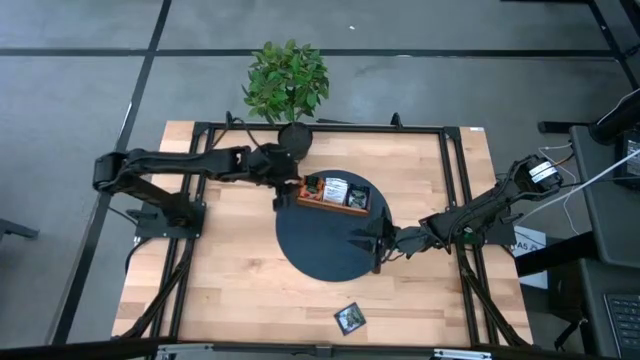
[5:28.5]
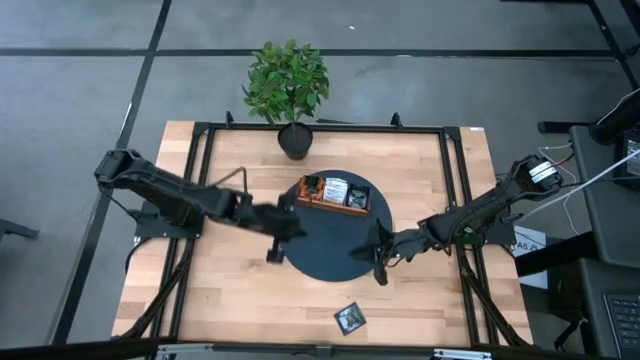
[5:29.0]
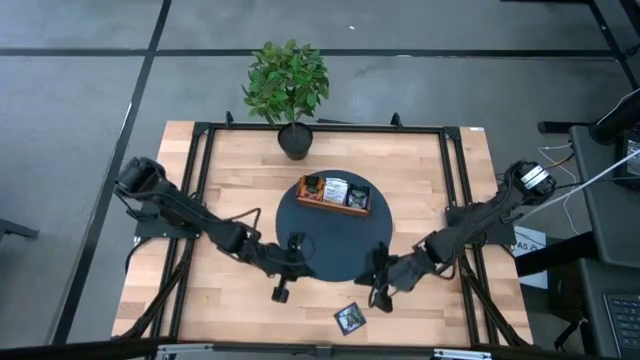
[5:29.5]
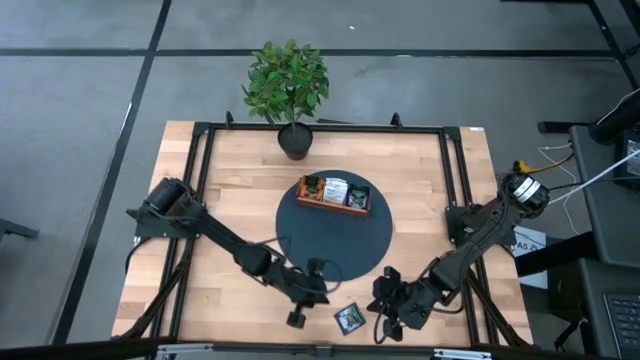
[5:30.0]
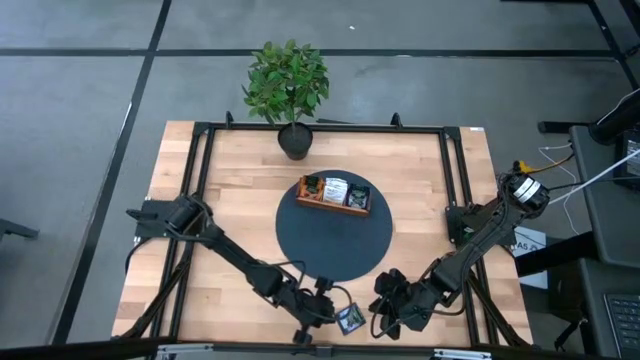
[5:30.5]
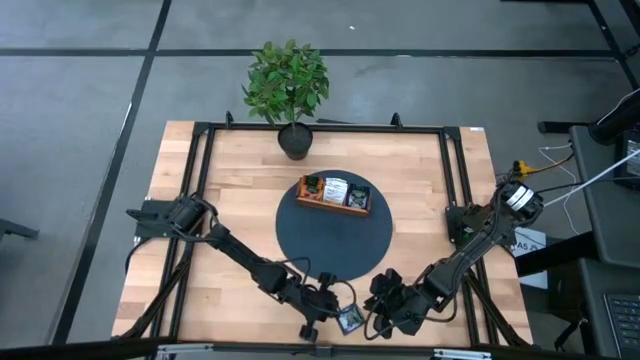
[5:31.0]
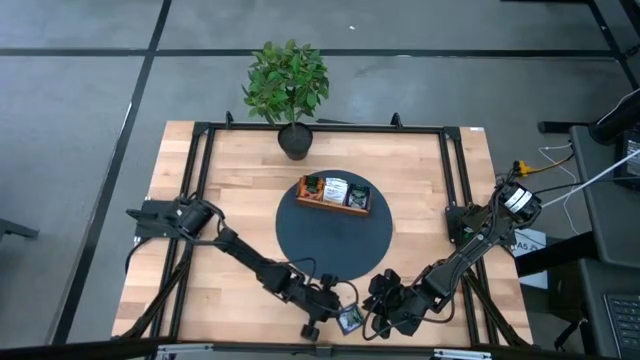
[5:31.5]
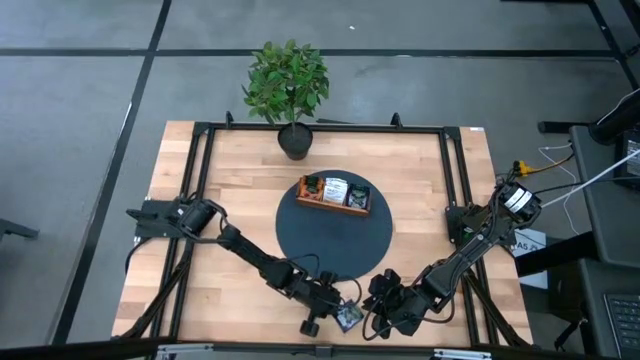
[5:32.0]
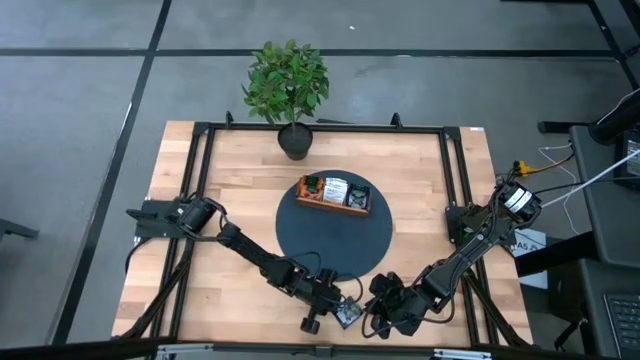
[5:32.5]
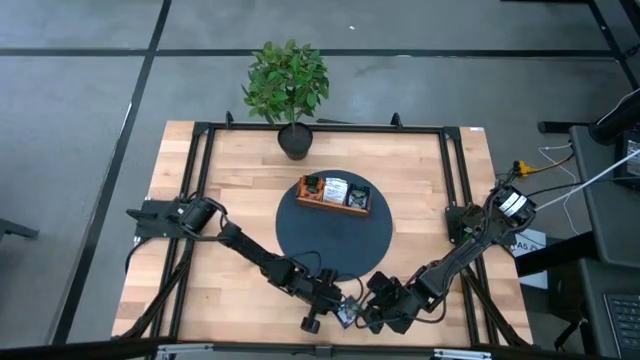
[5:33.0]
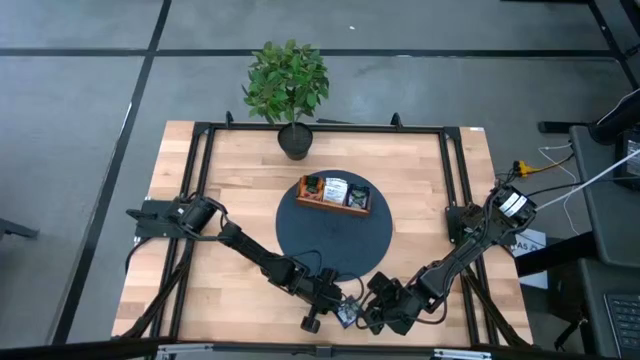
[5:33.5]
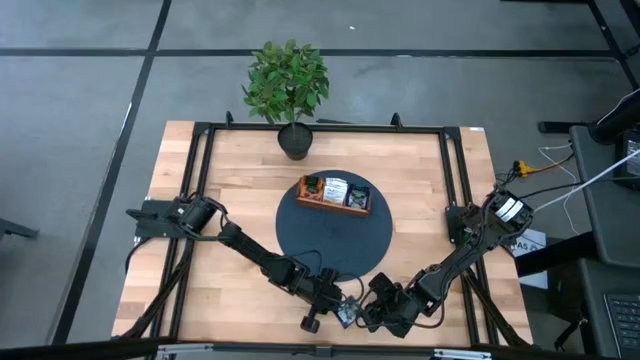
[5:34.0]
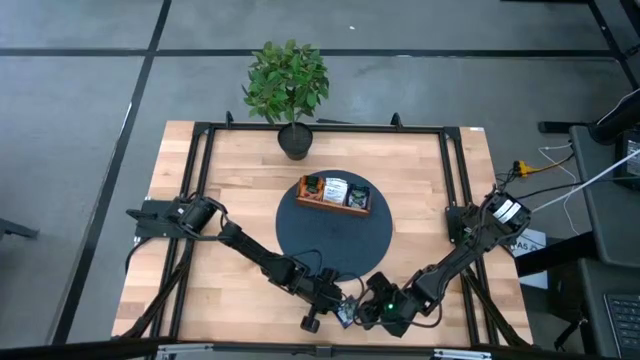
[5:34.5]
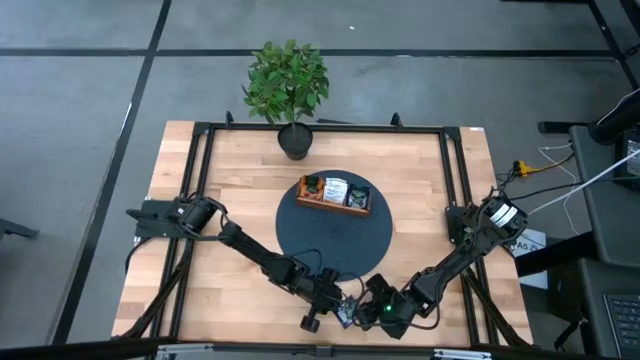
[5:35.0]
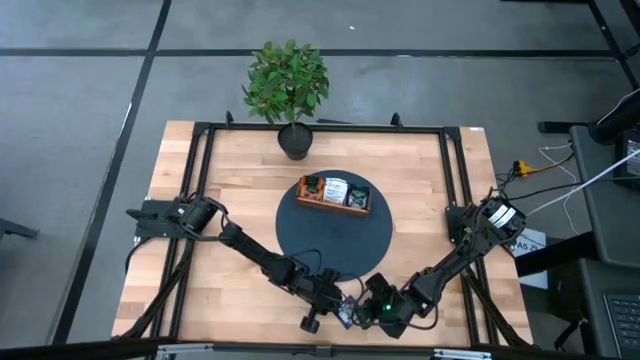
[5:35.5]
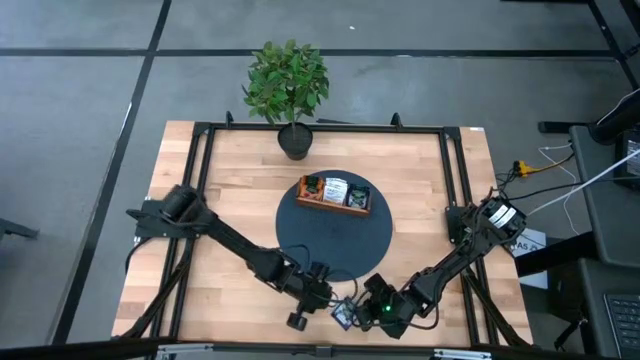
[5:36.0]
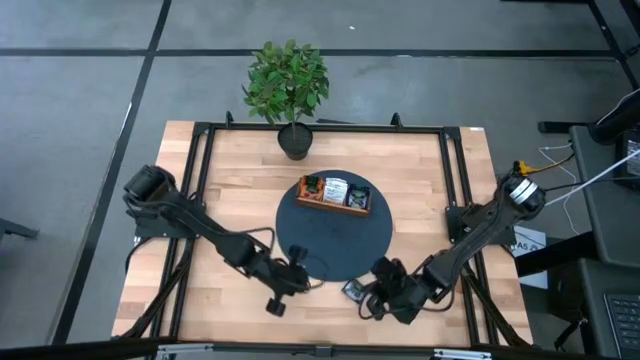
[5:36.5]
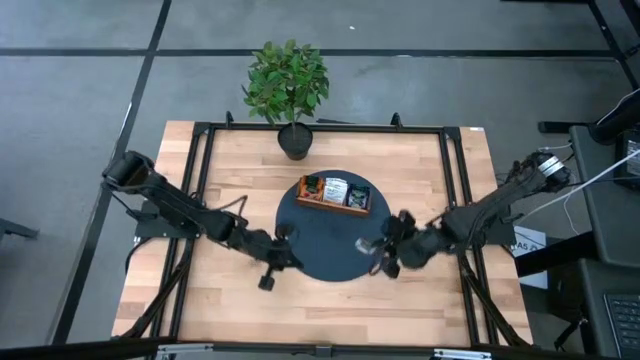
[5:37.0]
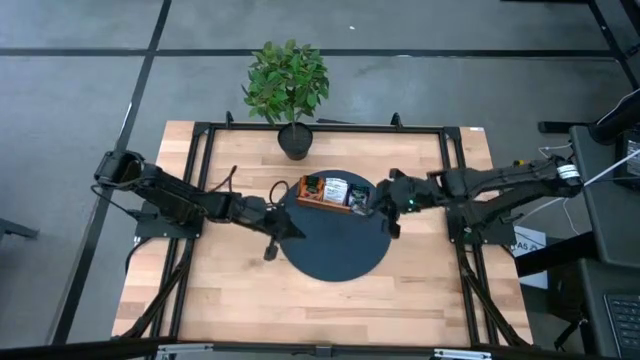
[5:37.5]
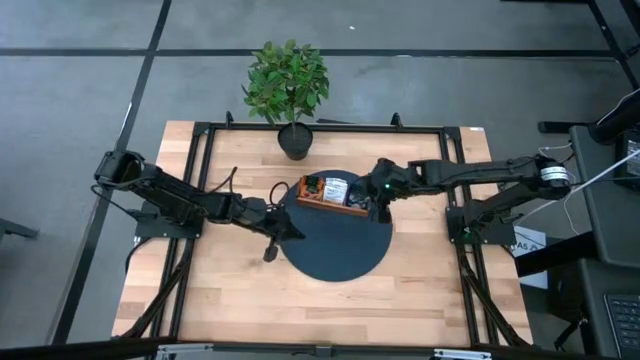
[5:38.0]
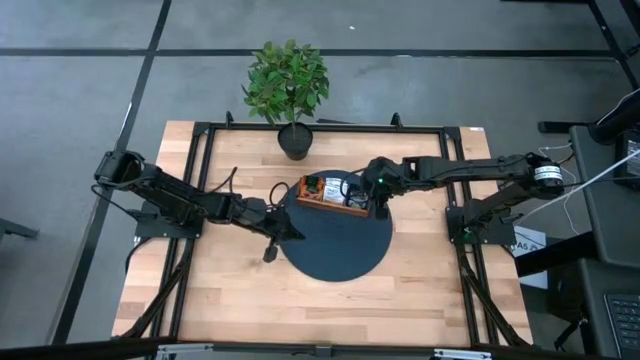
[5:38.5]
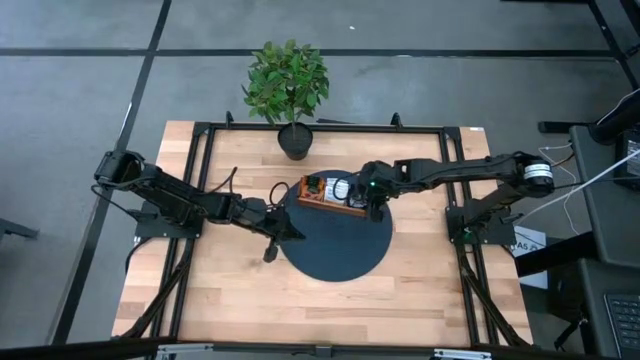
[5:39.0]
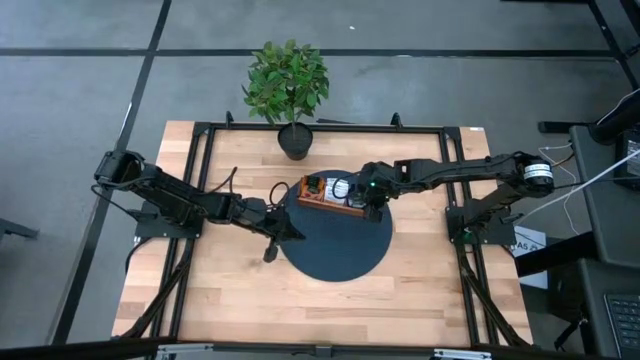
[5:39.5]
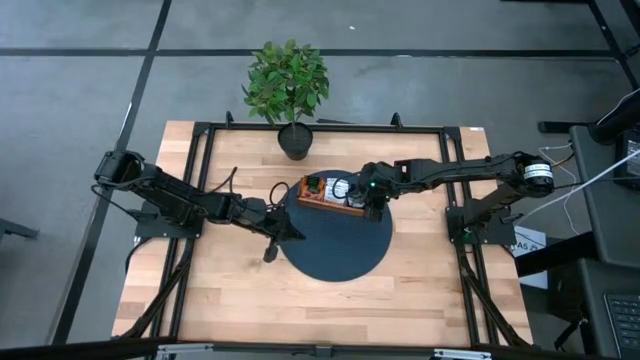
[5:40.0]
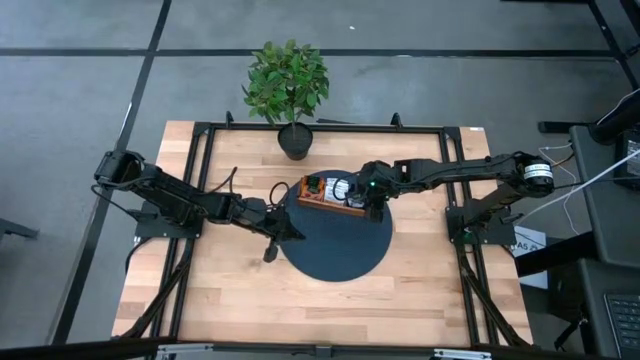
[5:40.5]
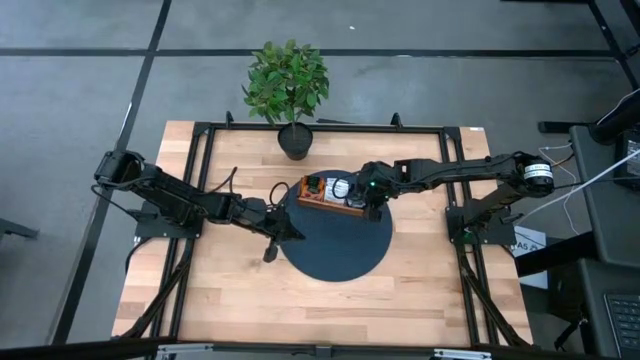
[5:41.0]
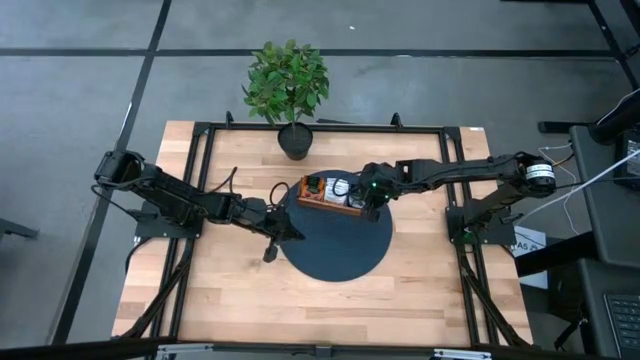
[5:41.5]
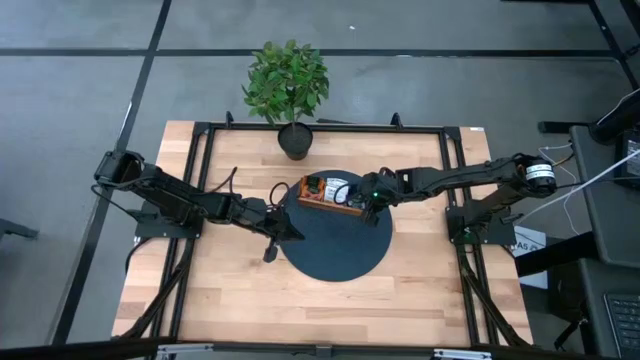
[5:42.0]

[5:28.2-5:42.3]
Task: Pick & Place Tea
Put the violet tea bag into the right side of the wooden organizer

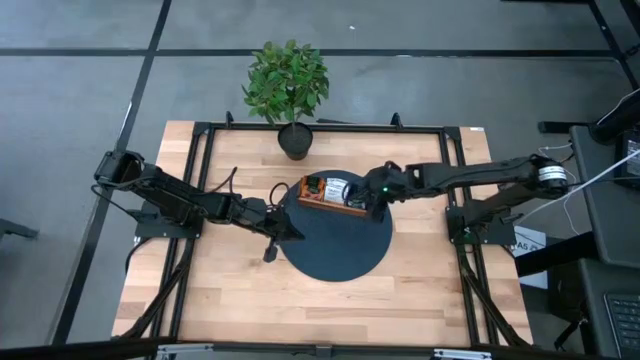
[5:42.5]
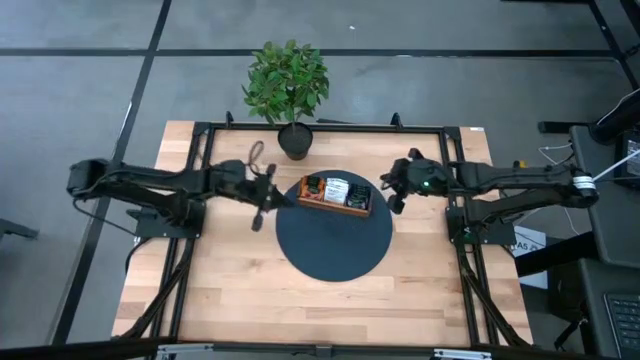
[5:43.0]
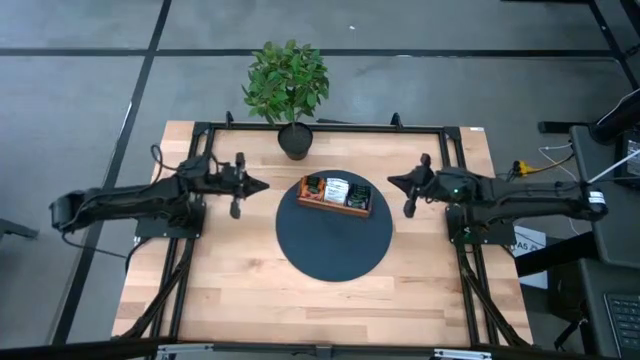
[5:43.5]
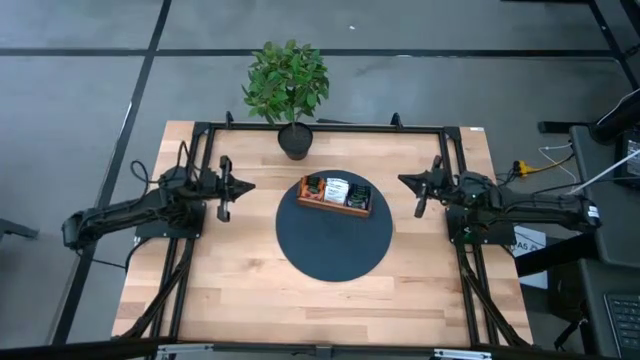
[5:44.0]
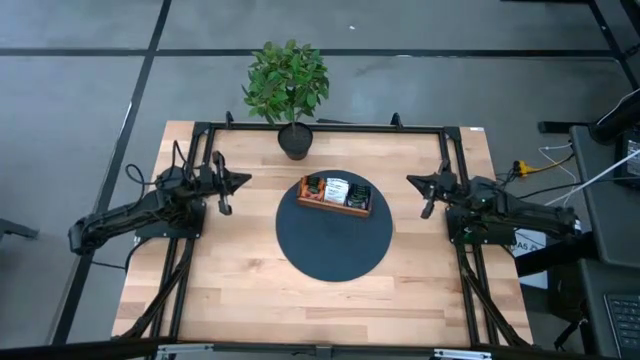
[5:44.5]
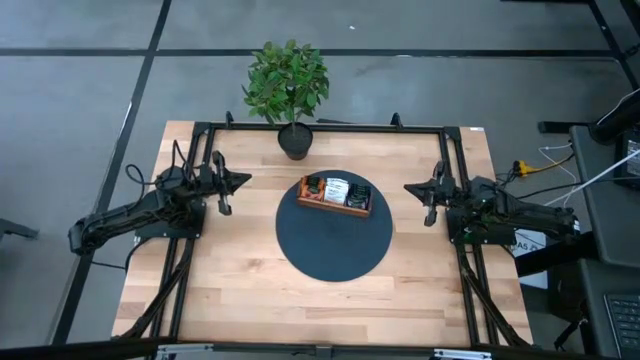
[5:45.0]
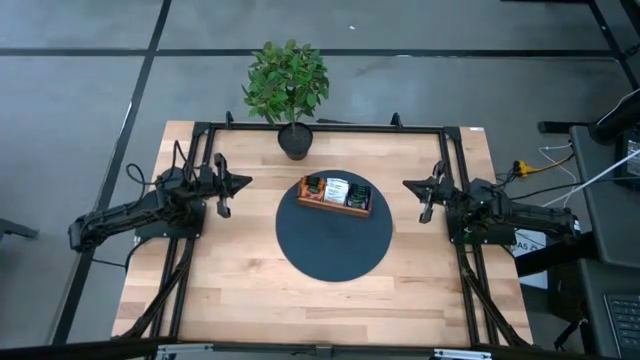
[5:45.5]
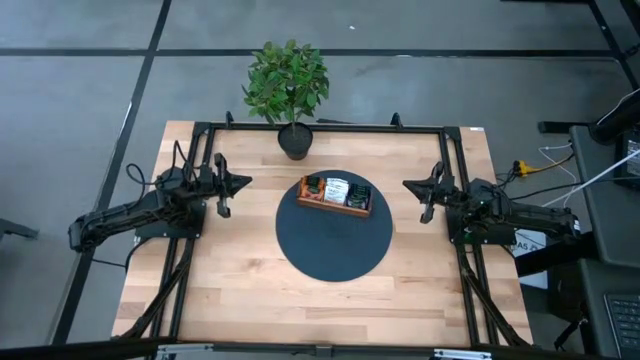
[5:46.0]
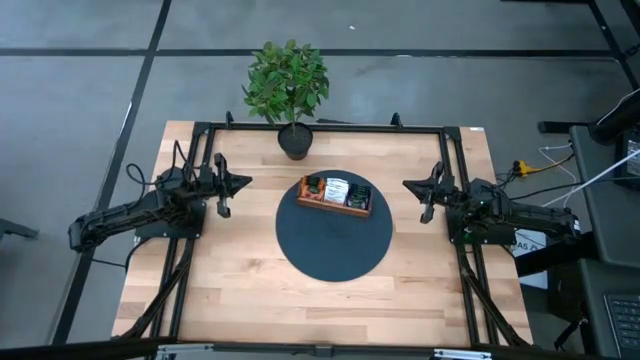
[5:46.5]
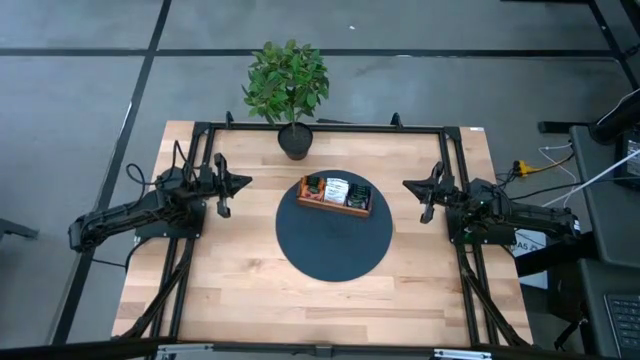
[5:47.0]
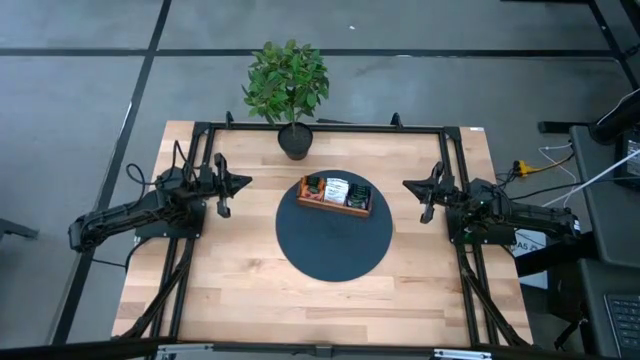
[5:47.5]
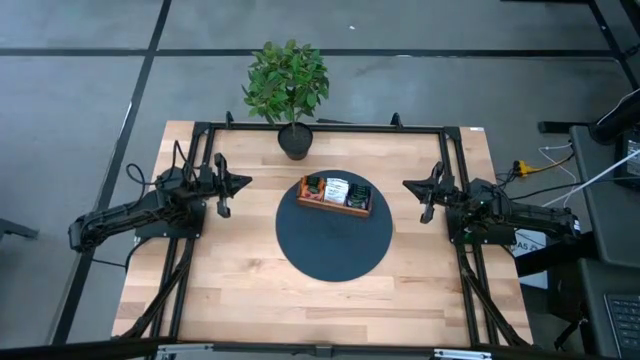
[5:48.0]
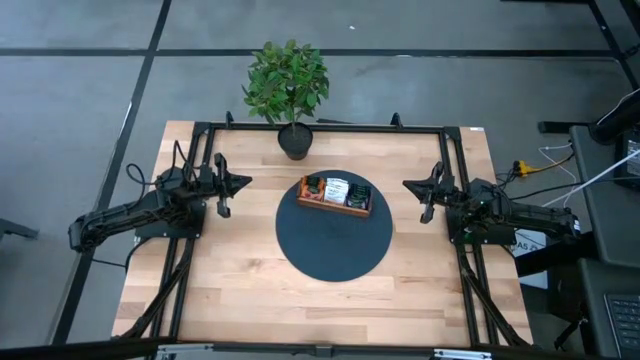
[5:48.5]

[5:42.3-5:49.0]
Return to Home Position

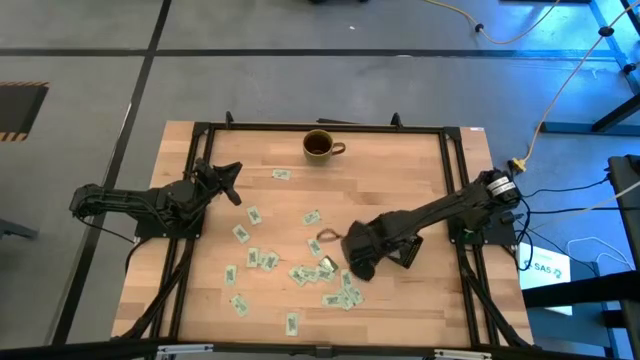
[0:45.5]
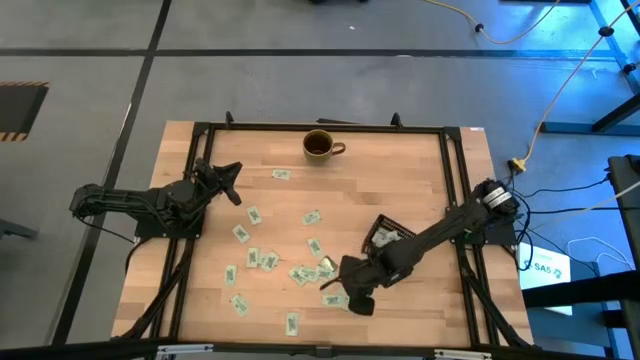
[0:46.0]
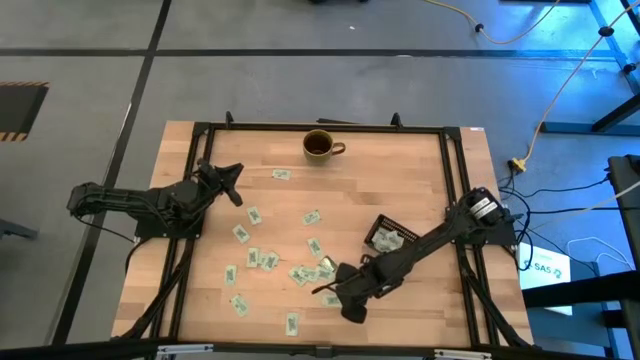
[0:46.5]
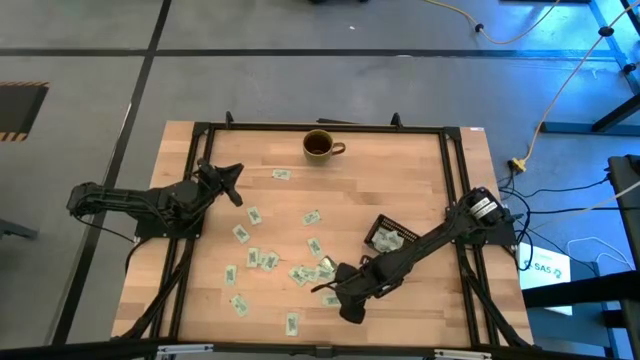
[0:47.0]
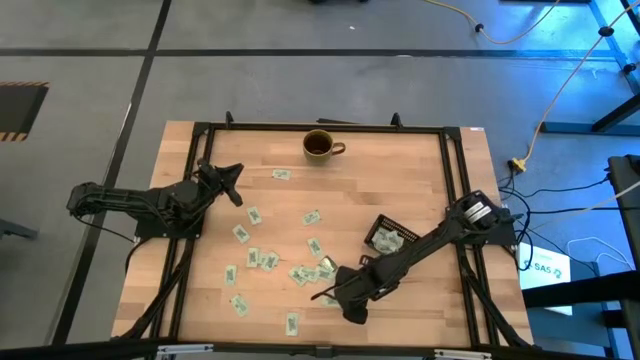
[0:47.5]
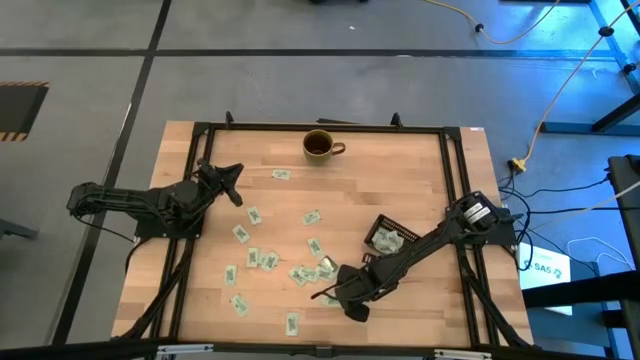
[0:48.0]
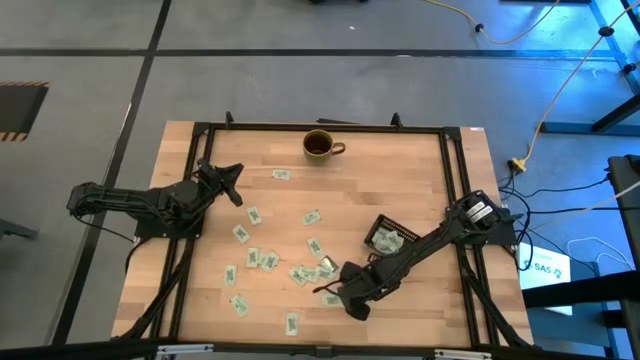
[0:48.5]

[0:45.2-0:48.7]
Task: Pick and place Stevia / Truvia into bins
Put the stevia packet into the black bin
